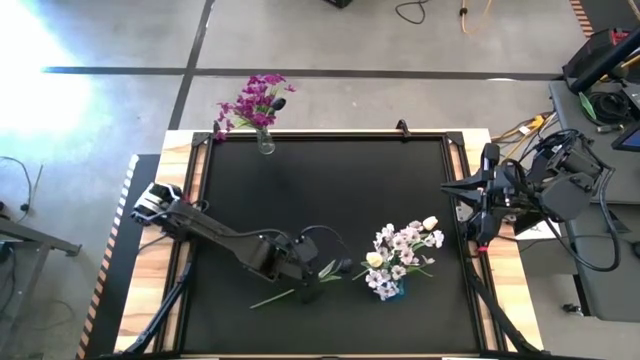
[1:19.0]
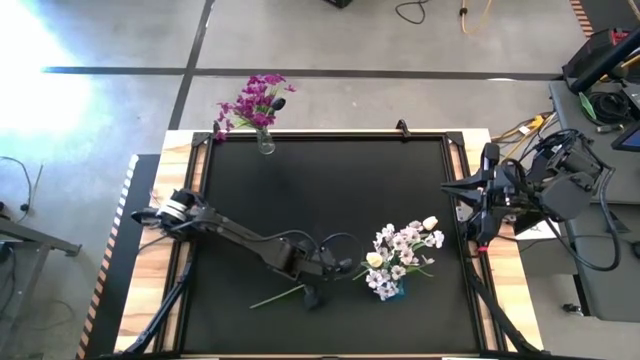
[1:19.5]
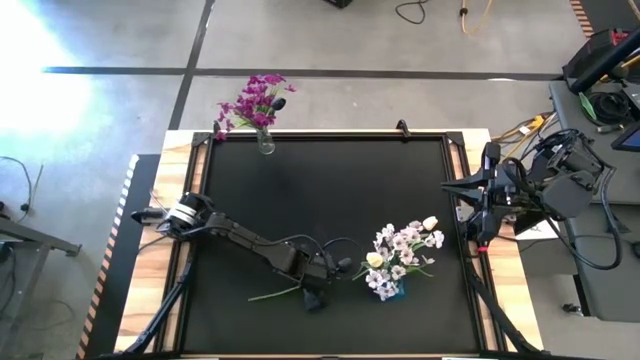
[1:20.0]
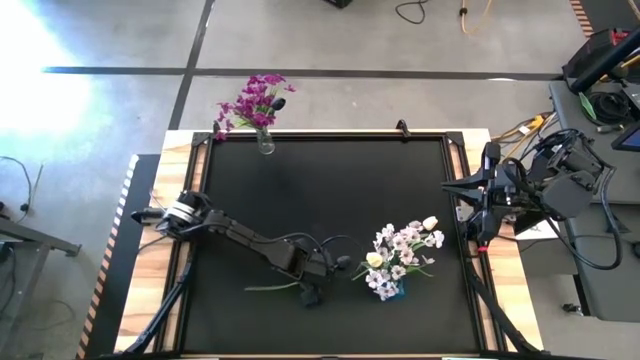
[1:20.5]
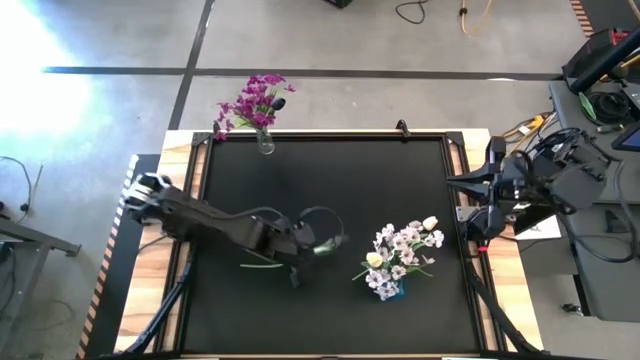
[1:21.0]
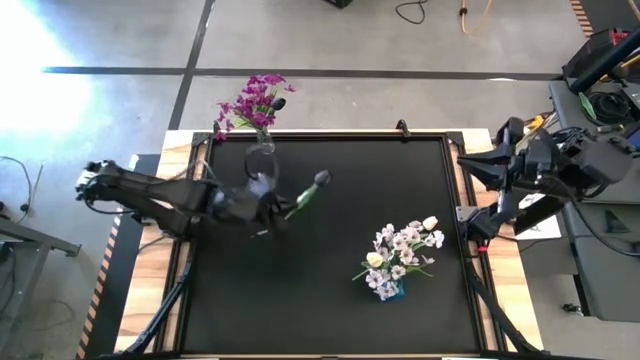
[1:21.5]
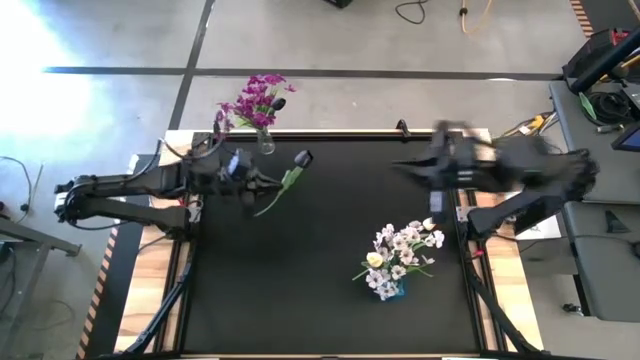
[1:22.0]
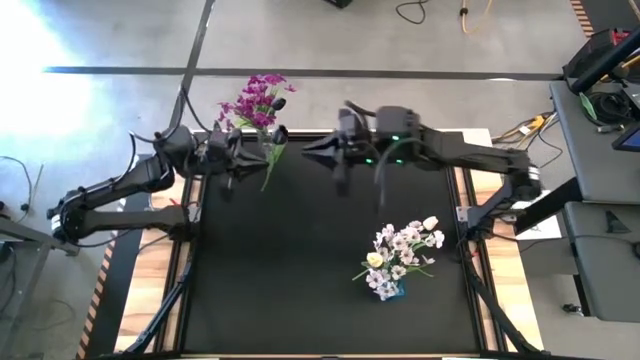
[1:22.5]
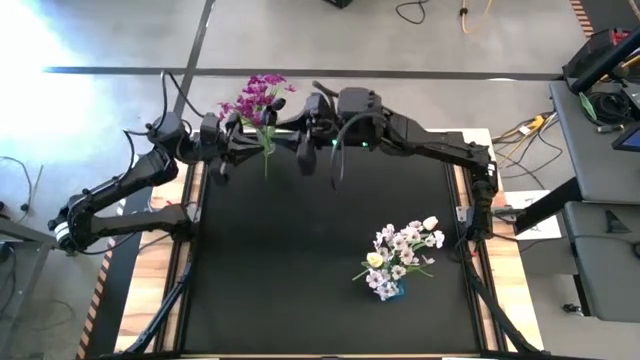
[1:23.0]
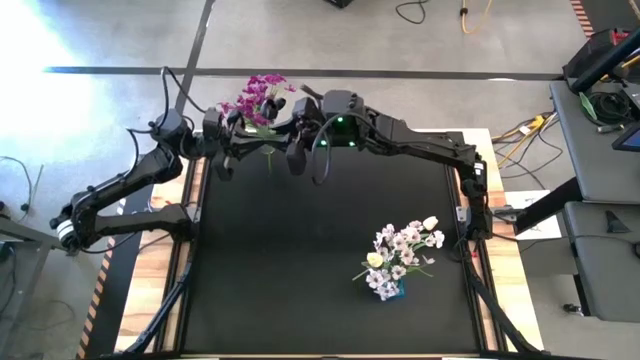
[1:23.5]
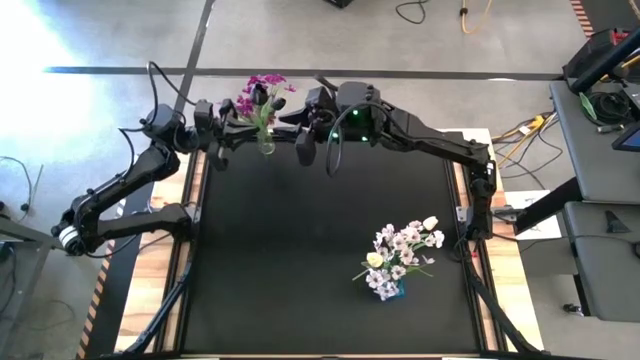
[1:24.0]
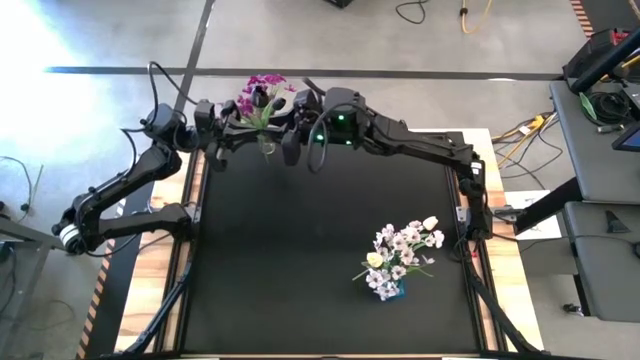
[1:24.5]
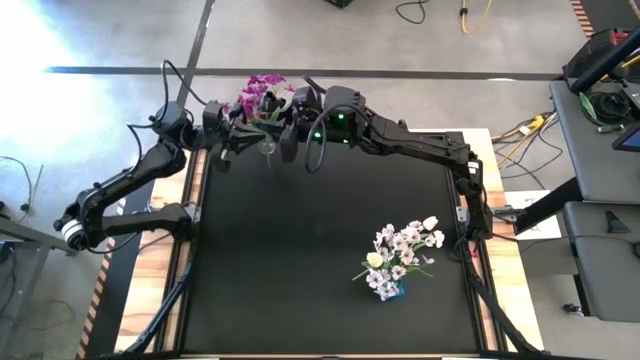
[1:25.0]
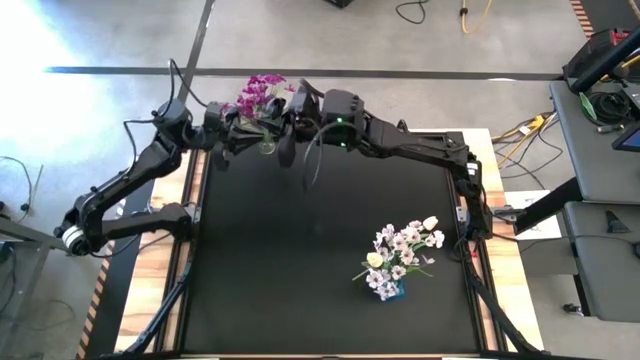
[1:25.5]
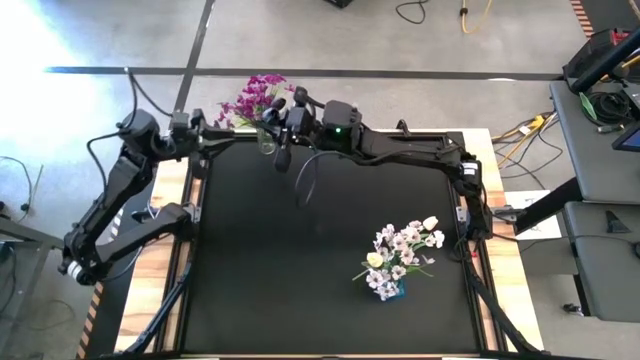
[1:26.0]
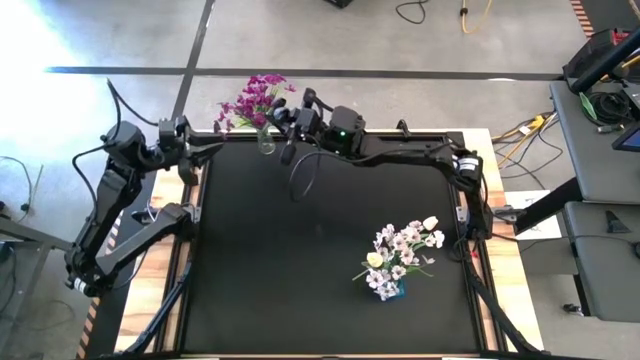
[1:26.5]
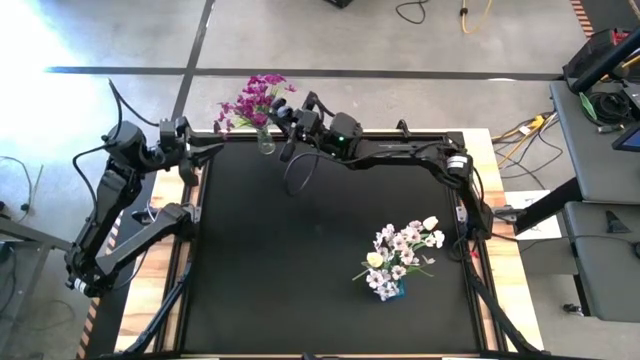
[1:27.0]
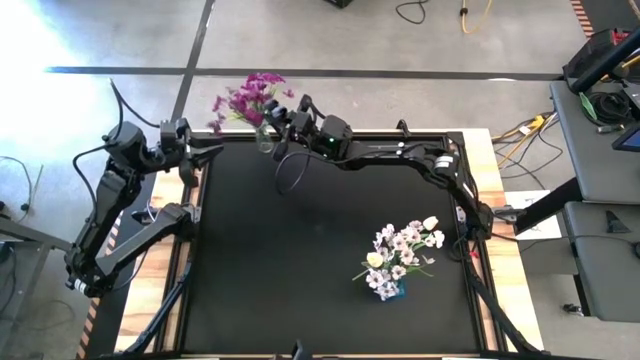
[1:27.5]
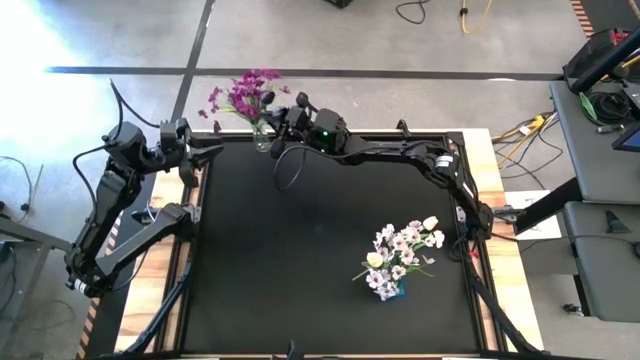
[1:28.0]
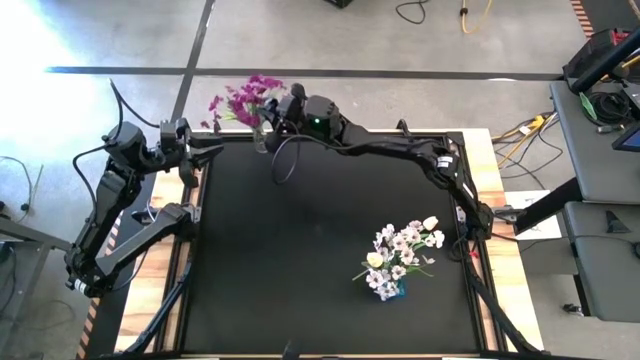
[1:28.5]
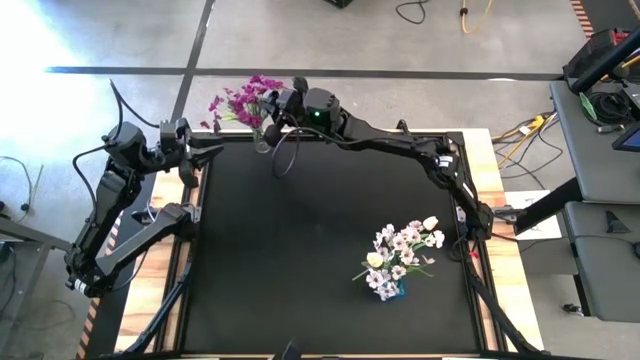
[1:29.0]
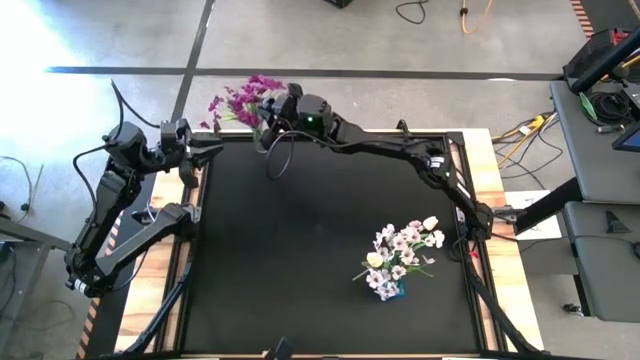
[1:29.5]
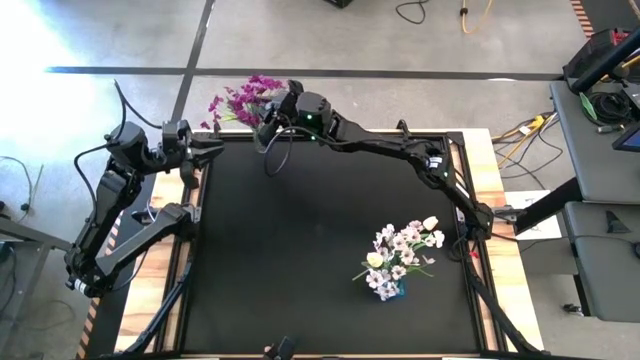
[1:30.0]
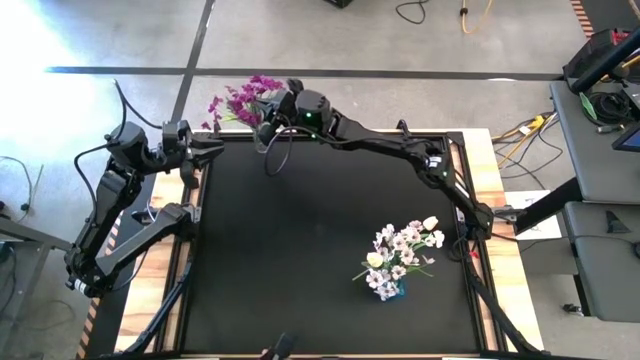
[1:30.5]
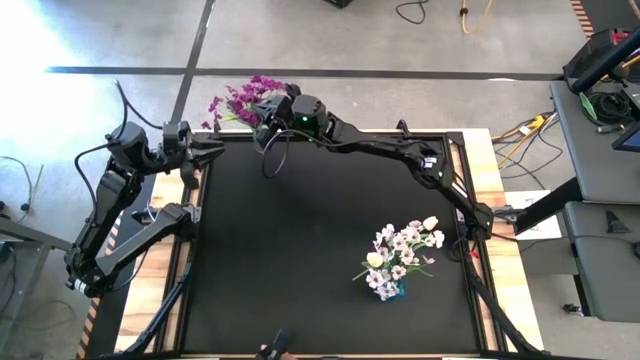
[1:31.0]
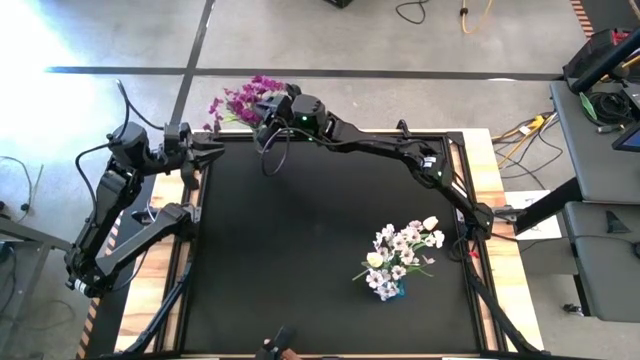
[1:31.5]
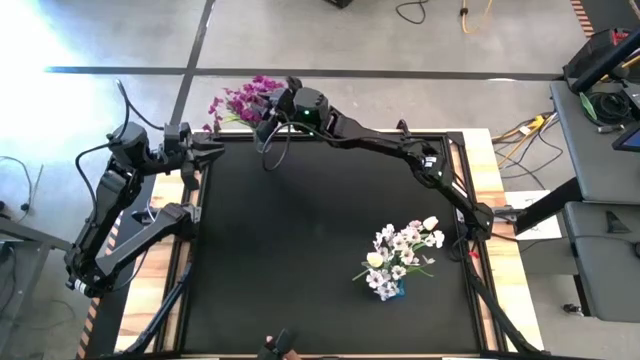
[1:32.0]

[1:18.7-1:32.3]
Task: Sort flowers into vase by color
Put the black tulip into the transparent vase

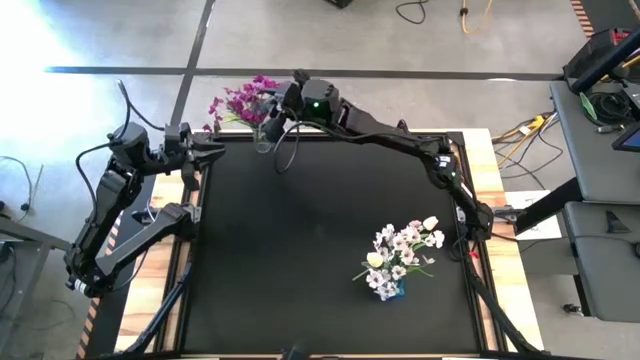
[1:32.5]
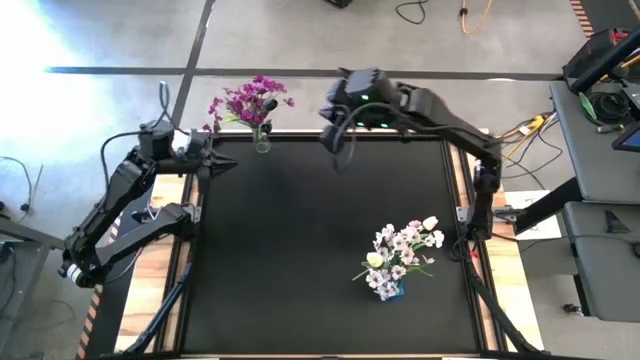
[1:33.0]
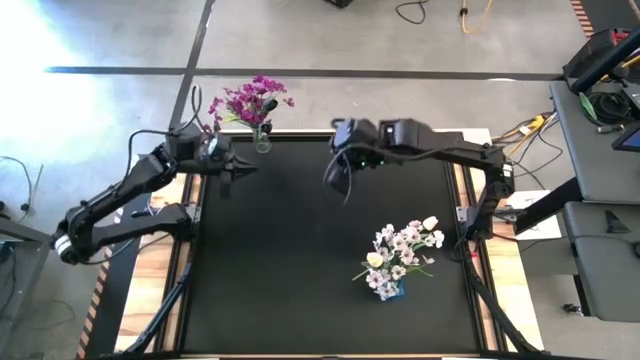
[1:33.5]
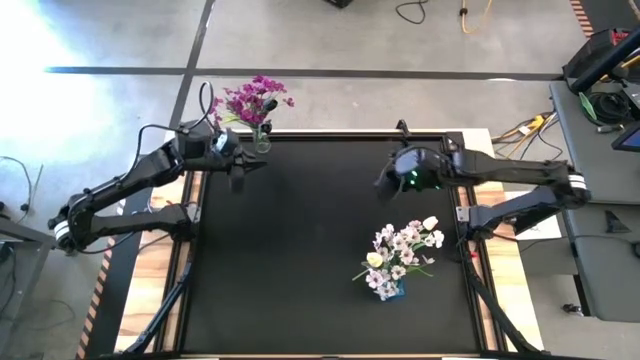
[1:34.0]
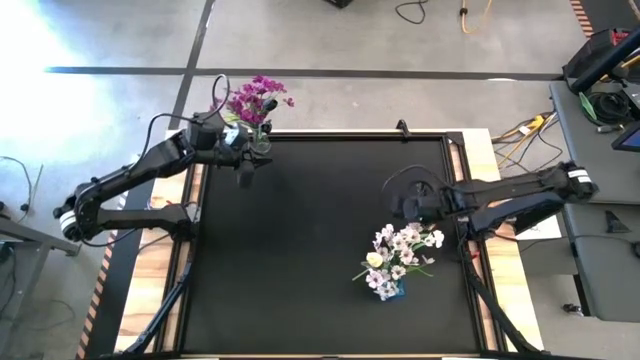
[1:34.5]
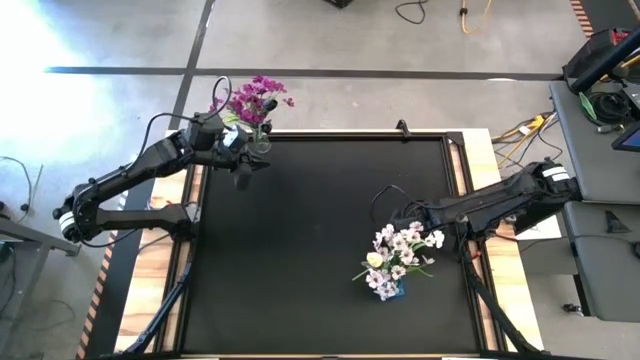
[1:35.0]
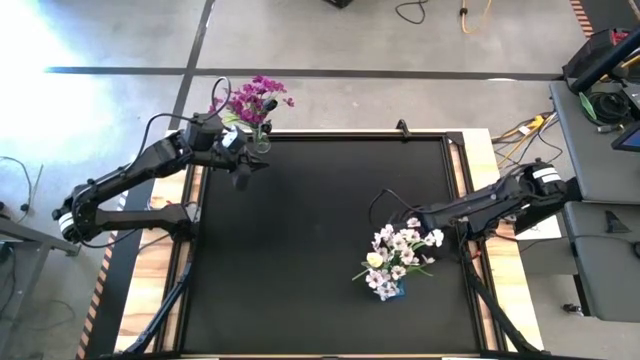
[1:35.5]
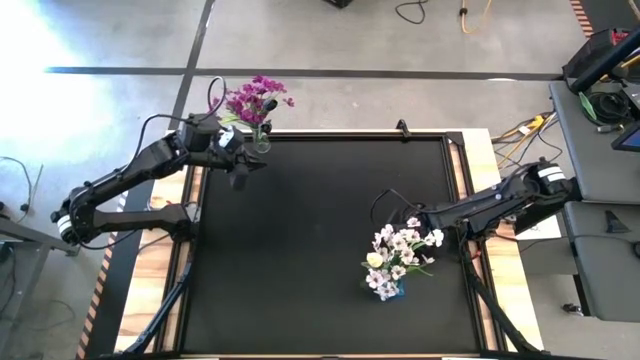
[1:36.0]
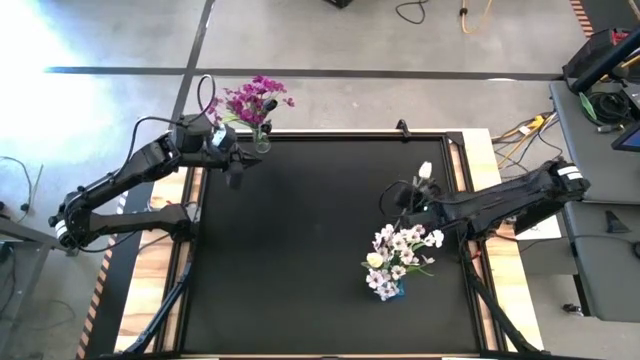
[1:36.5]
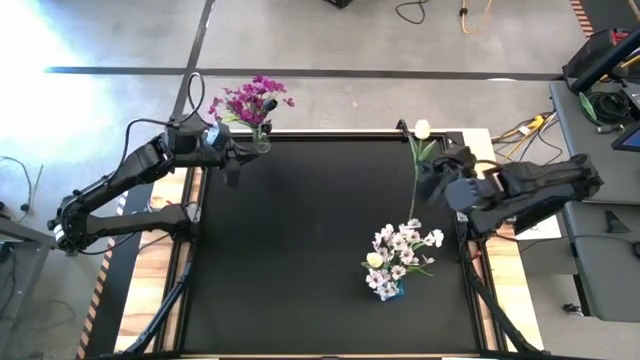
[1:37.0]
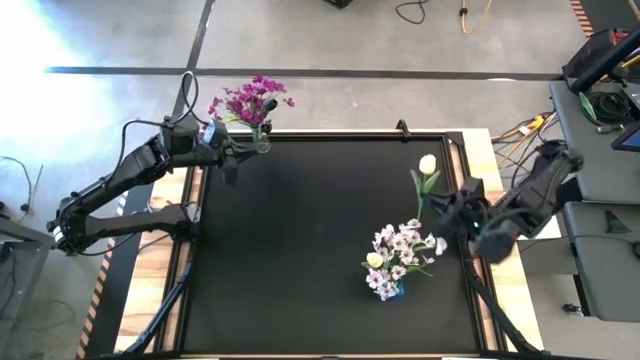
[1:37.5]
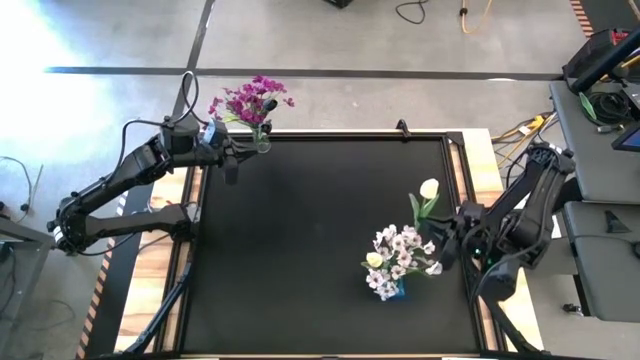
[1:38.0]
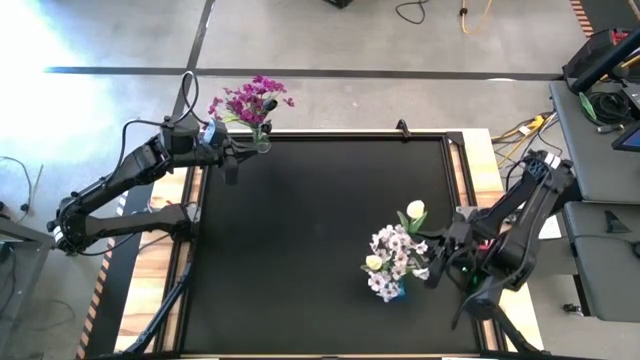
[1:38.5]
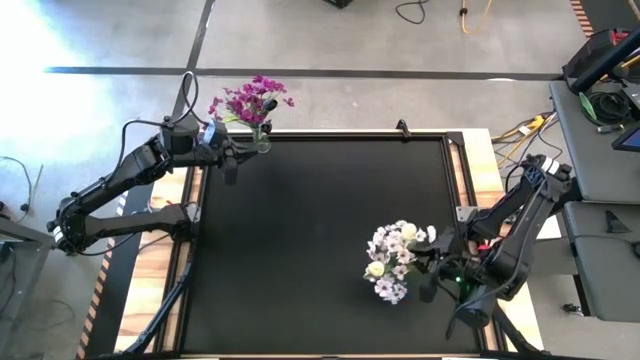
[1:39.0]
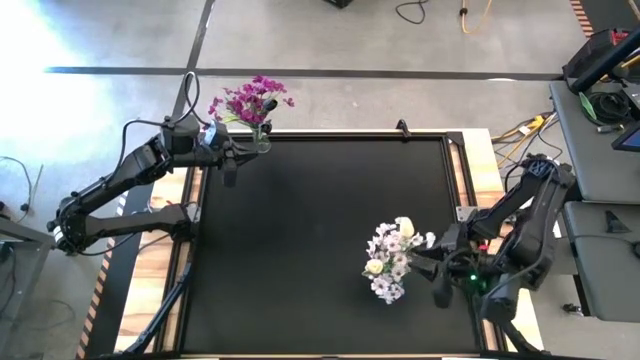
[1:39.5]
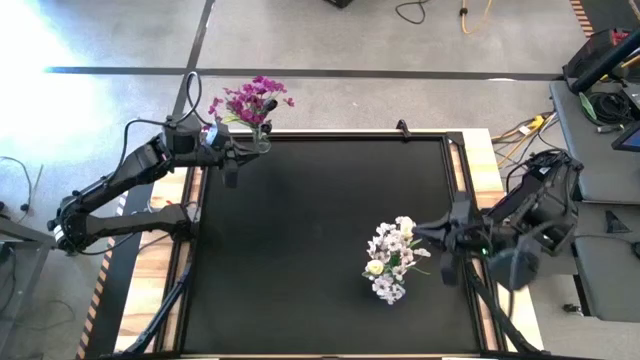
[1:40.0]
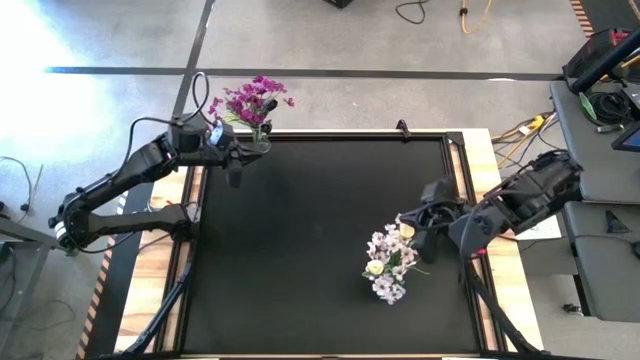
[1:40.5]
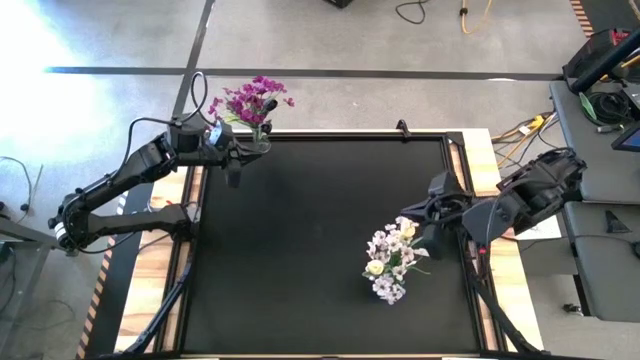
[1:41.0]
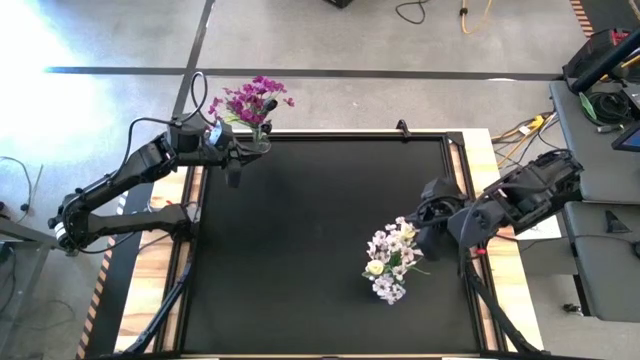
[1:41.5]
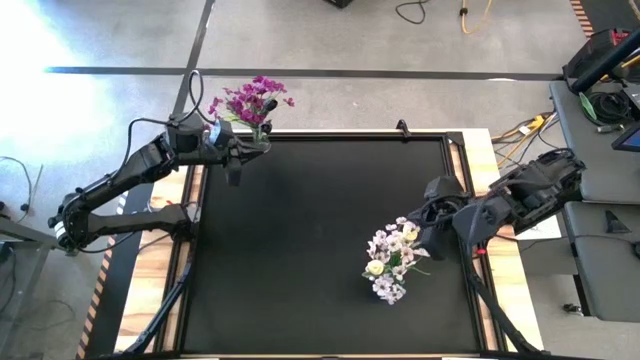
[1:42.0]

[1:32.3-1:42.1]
Put the white tulip into the blue vase
